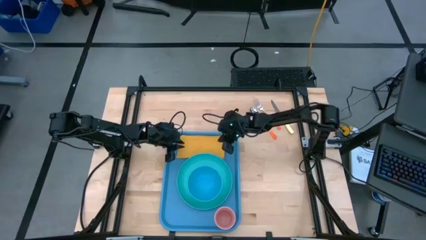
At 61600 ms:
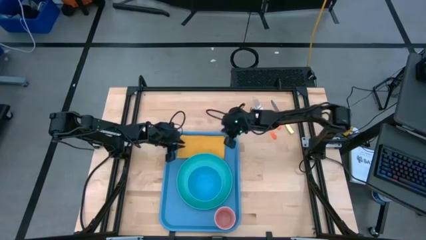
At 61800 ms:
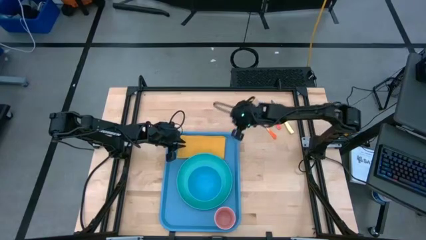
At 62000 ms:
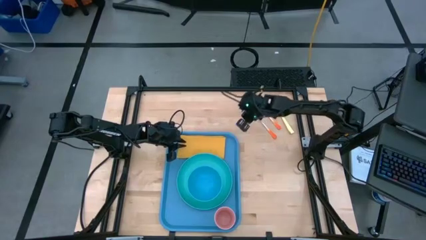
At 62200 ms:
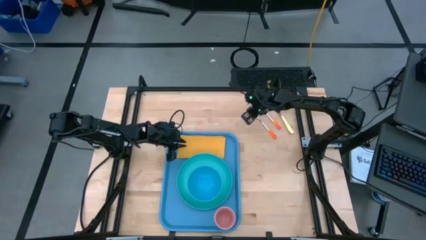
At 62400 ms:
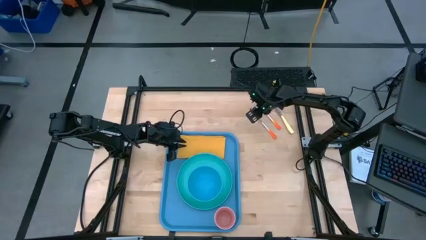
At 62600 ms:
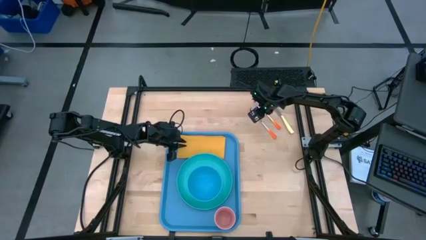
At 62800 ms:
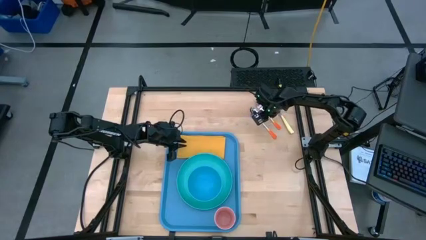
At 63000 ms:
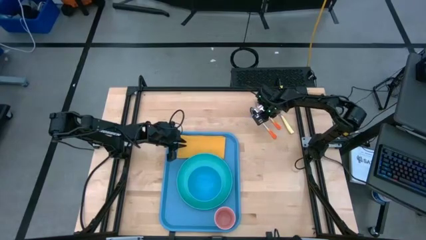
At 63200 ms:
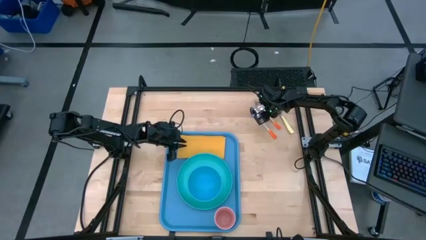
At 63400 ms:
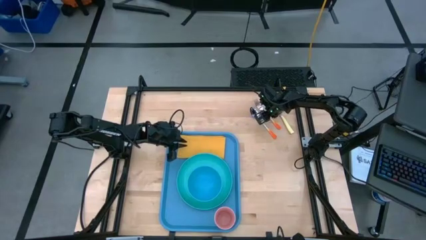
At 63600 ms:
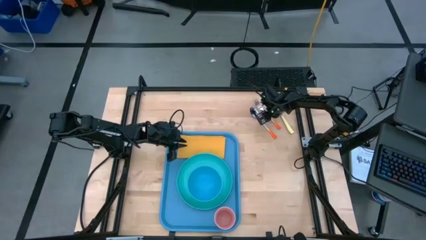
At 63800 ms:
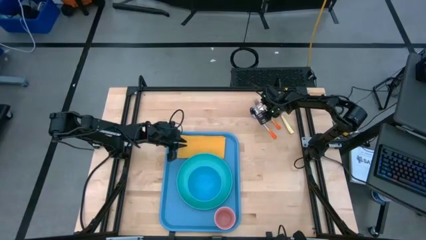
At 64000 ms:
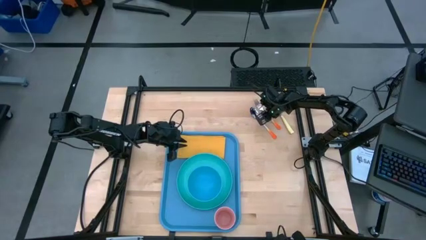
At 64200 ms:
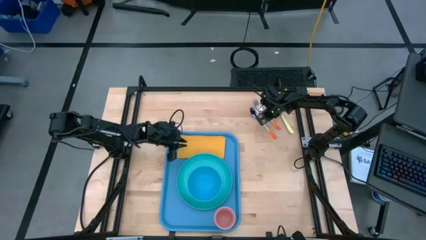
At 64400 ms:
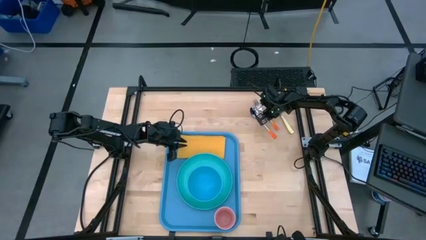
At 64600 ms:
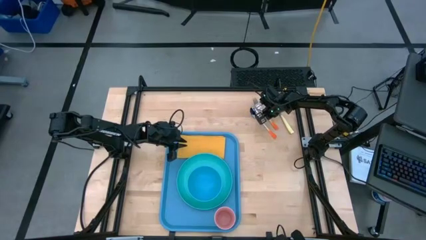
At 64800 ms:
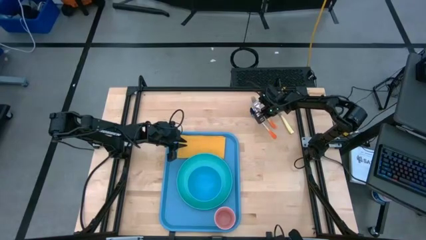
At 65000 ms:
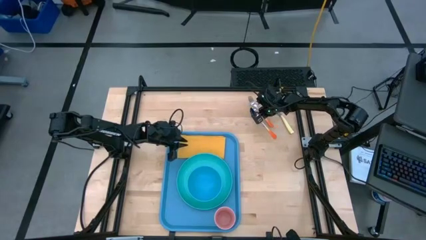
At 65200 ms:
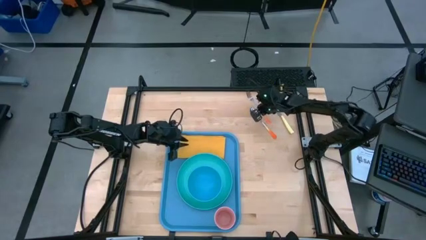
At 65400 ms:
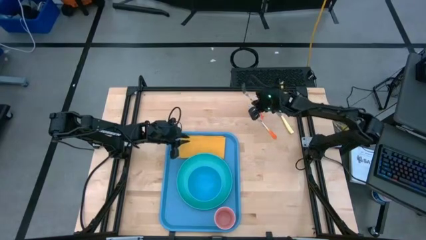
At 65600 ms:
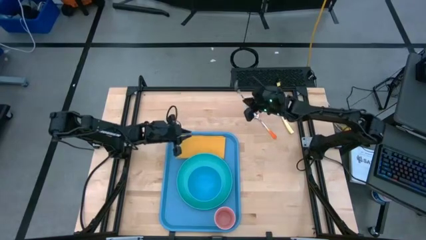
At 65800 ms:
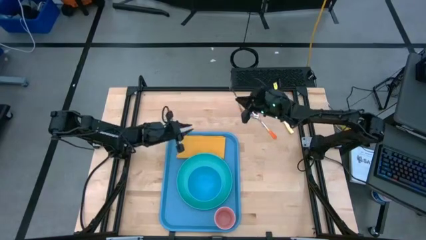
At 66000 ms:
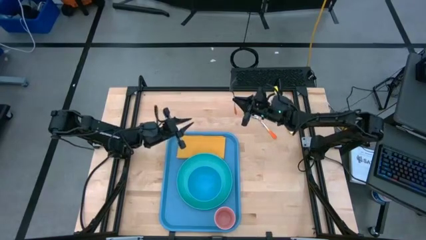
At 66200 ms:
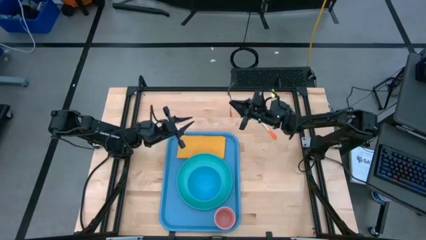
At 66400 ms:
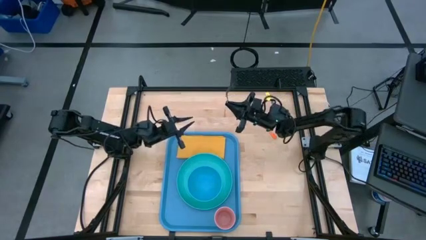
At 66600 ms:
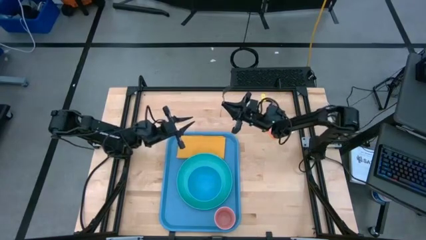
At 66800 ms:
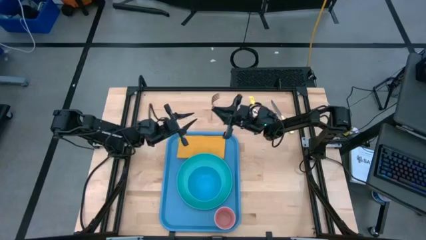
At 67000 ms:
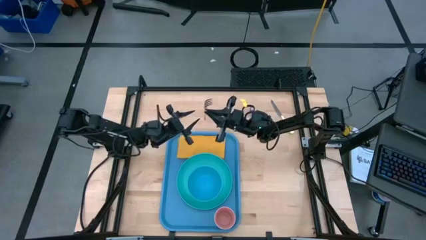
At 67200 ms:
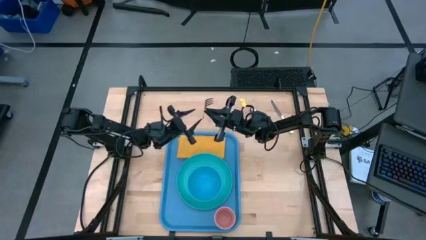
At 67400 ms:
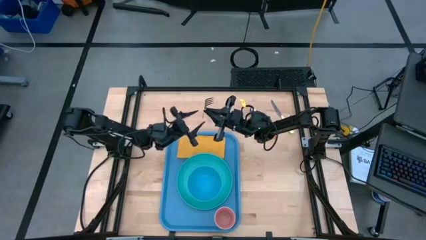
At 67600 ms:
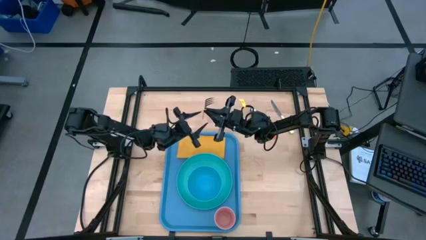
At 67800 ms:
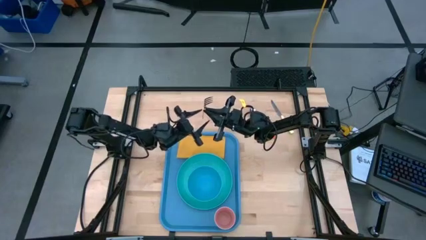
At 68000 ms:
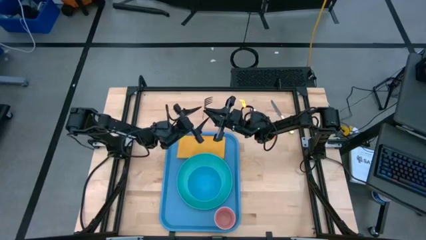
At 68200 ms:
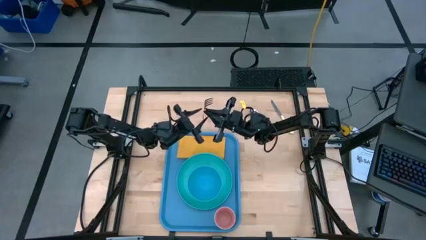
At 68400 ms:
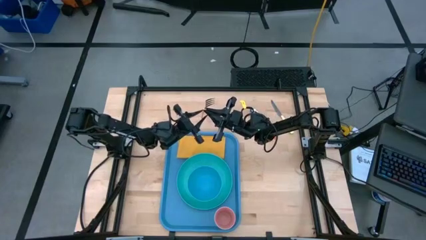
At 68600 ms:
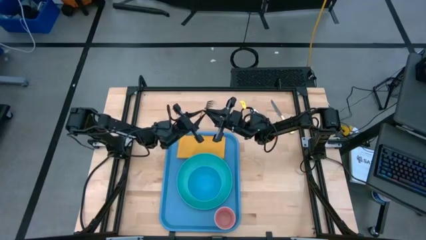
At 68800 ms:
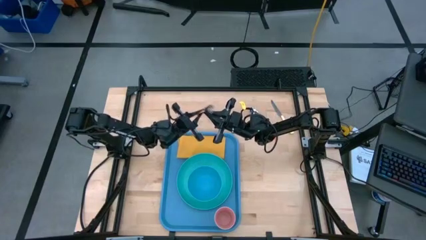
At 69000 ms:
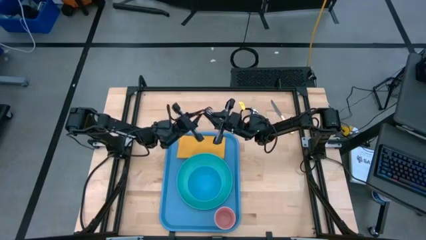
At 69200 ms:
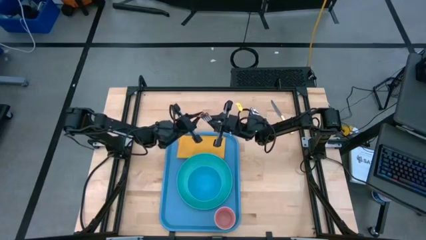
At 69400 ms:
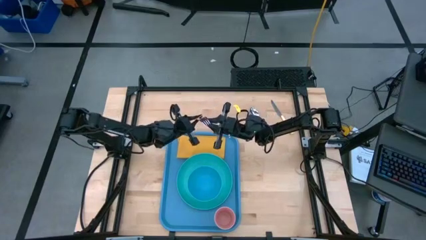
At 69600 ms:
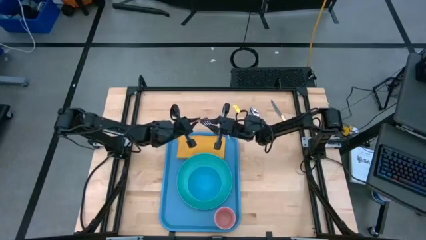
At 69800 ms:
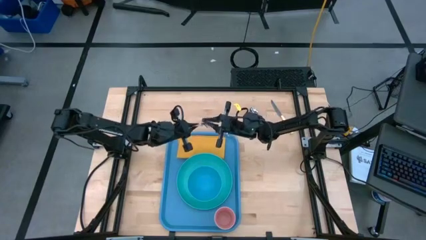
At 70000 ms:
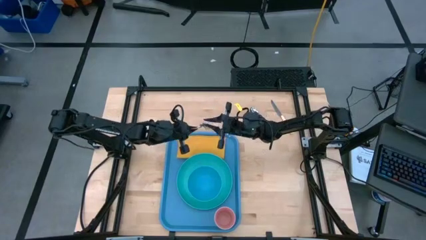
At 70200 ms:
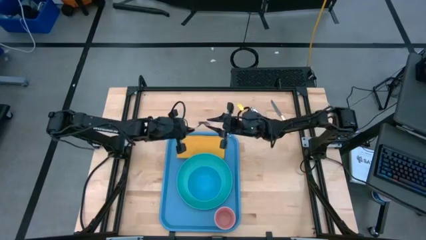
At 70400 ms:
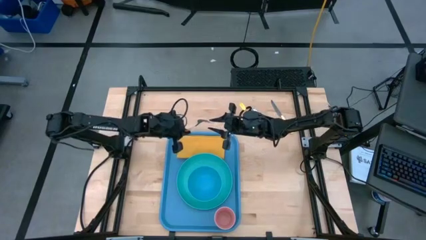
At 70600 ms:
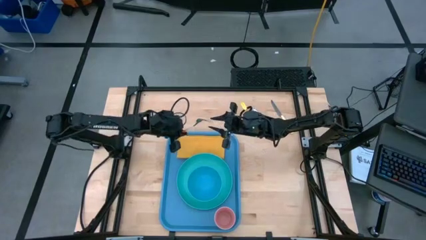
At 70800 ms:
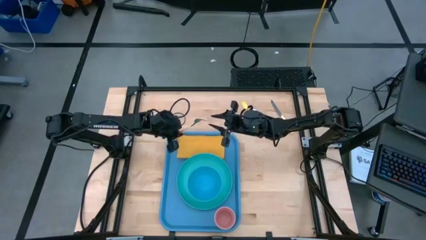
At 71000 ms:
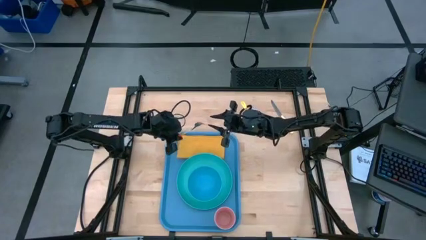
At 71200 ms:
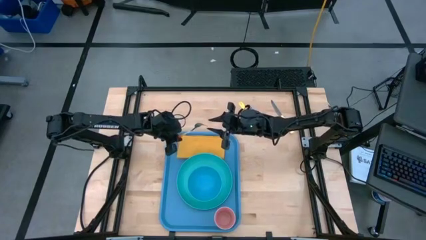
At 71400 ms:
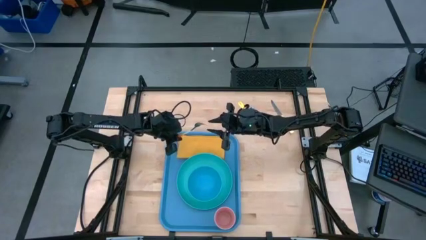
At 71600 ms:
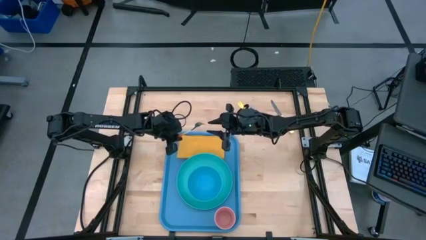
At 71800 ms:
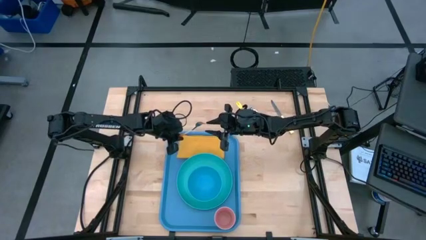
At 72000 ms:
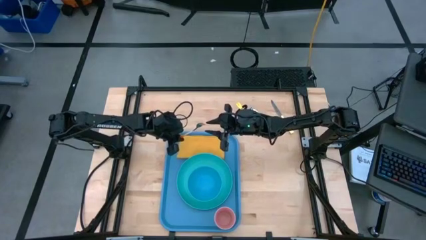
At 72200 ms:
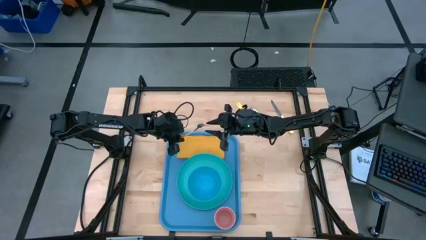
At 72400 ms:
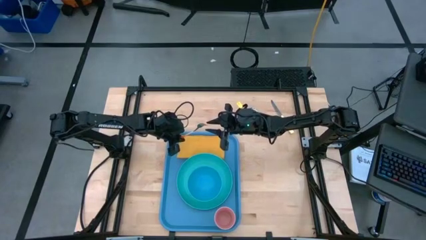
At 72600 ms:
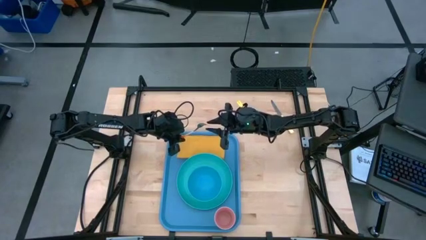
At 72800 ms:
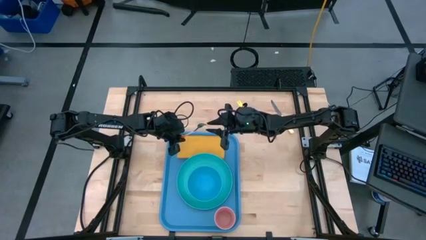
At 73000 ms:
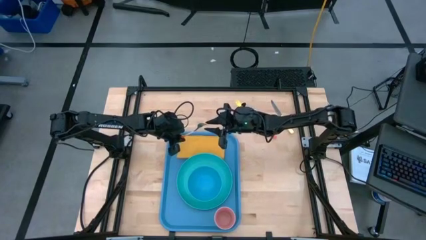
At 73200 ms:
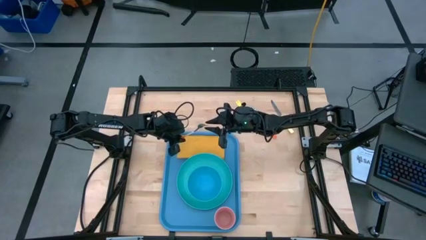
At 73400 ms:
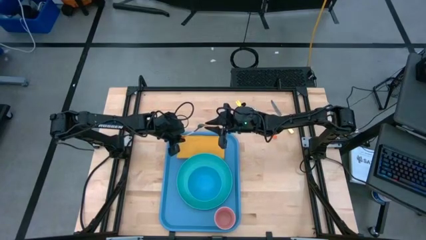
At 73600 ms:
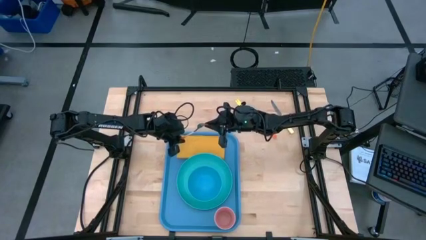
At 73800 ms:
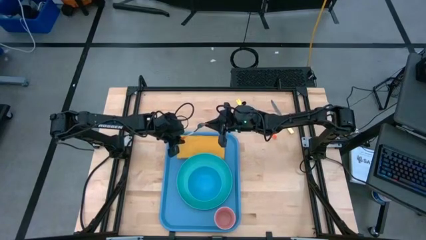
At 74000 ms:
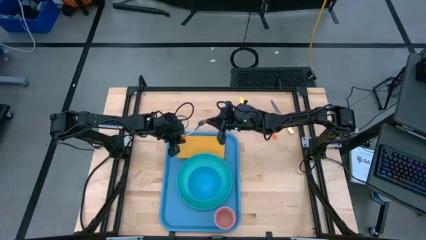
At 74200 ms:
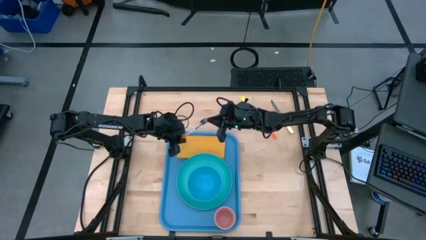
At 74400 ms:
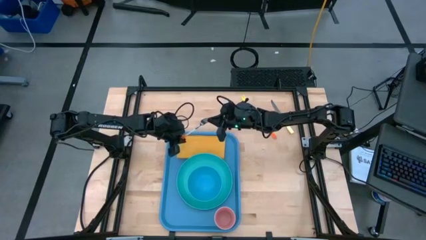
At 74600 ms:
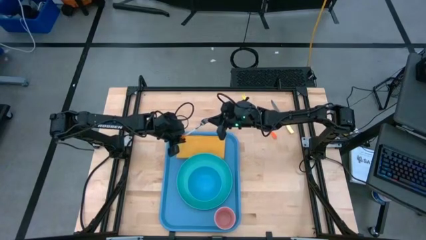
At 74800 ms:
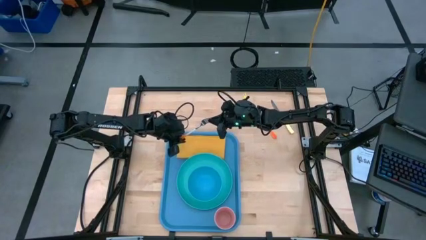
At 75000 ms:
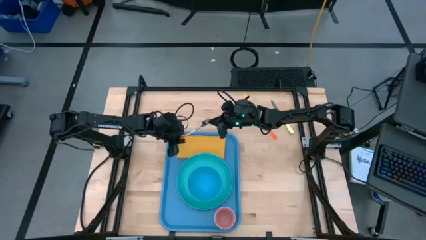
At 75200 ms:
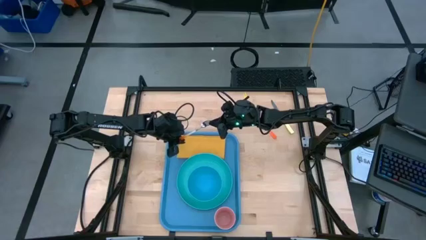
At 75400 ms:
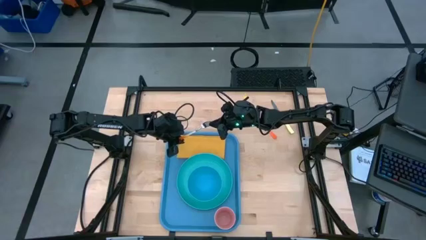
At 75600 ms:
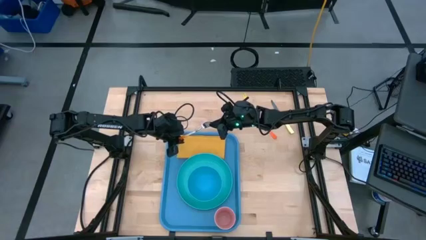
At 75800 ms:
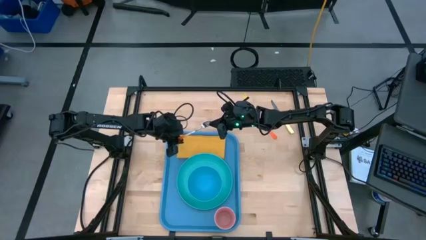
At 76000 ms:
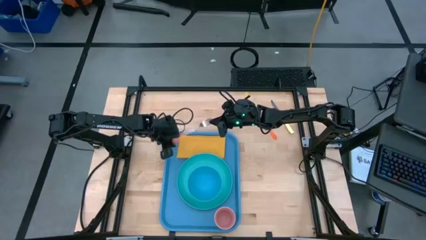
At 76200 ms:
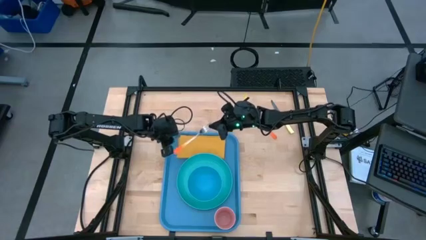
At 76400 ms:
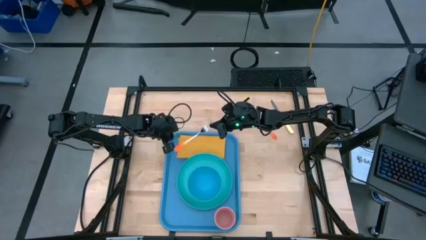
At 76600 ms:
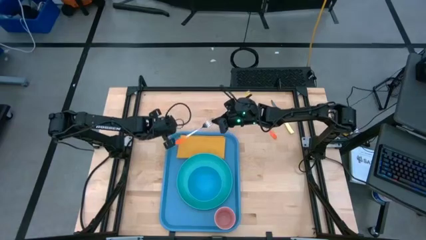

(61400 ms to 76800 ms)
Task: Set up tray
Put the orange fork on top of the orange napkin

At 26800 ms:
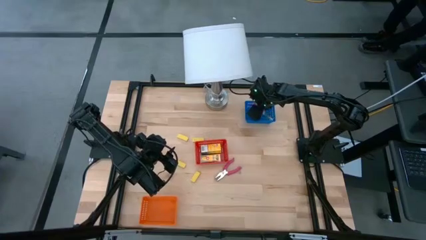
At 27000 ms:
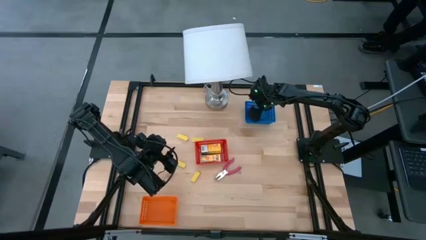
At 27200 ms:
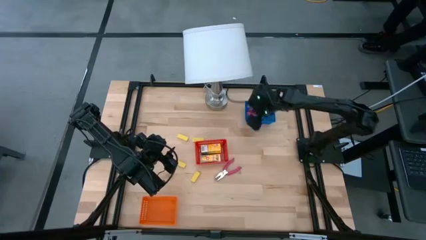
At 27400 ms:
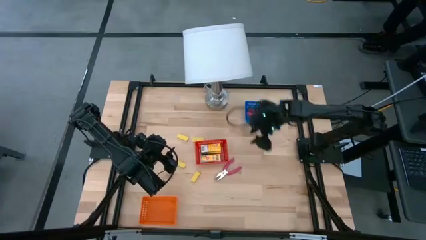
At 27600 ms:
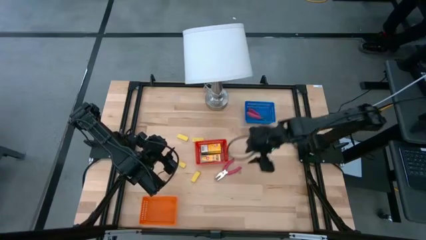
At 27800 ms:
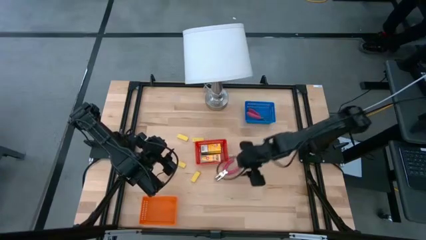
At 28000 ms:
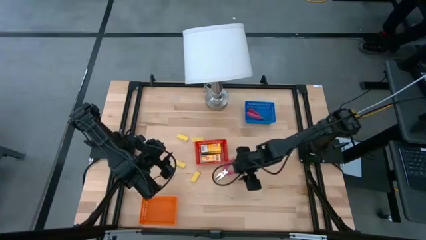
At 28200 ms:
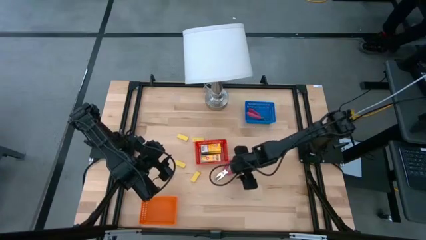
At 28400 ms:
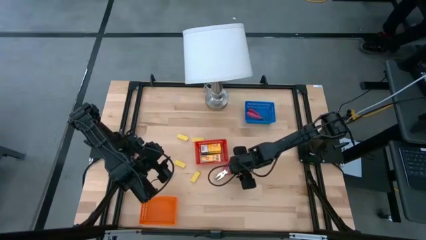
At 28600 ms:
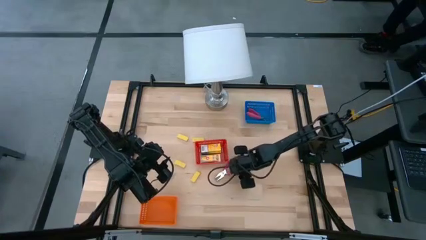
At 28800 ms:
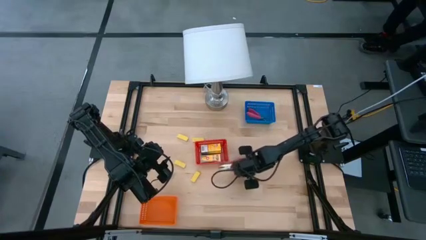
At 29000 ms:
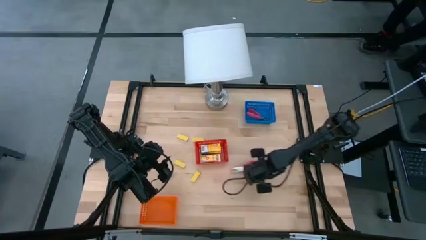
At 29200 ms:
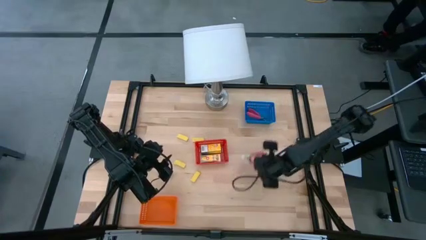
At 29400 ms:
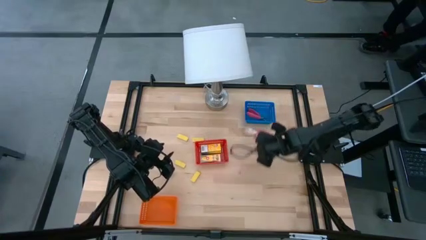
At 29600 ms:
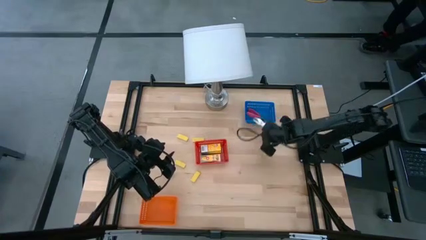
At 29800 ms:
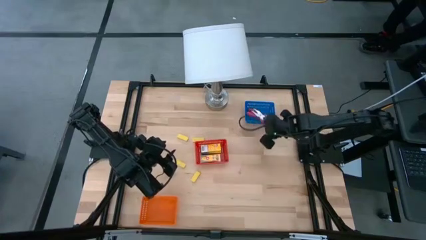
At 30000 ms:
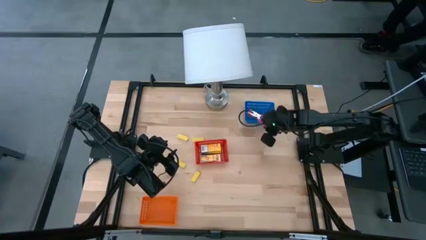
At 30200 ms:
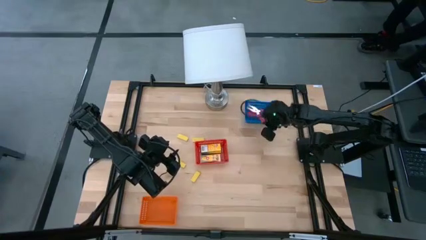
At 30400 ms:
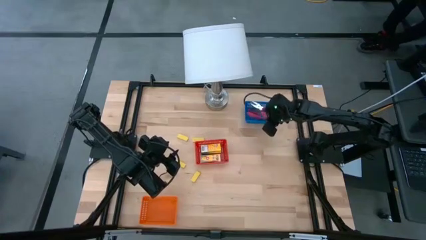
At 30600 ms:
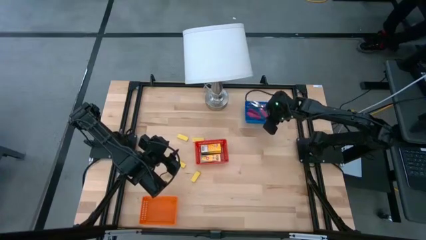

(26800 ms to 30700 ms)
Task: Pick & Place School Supplies
Put the pink hole puncher into the blue bin
